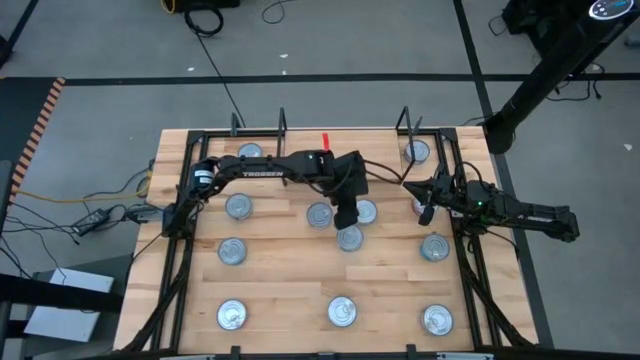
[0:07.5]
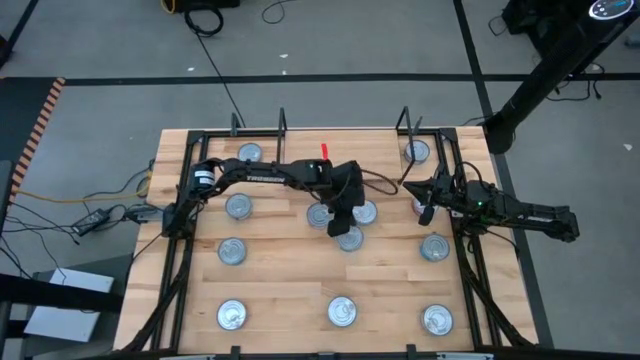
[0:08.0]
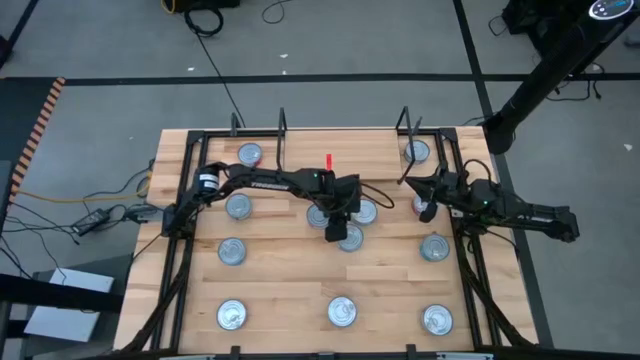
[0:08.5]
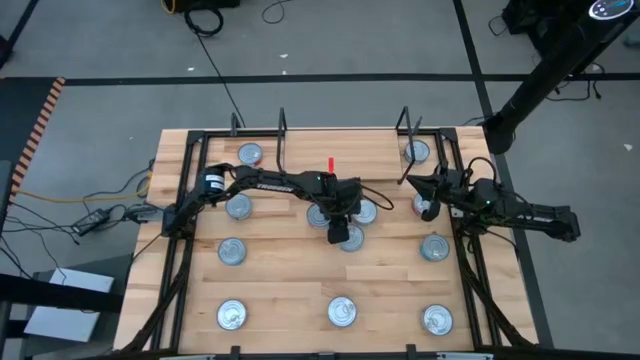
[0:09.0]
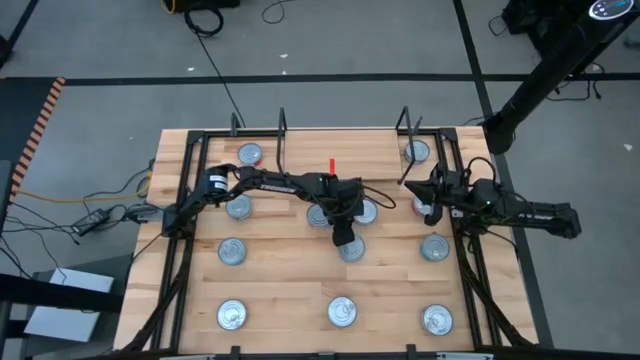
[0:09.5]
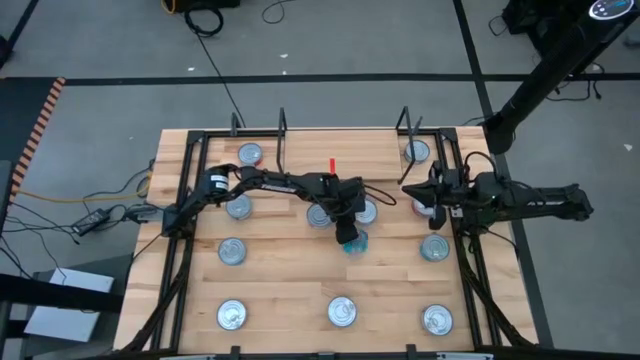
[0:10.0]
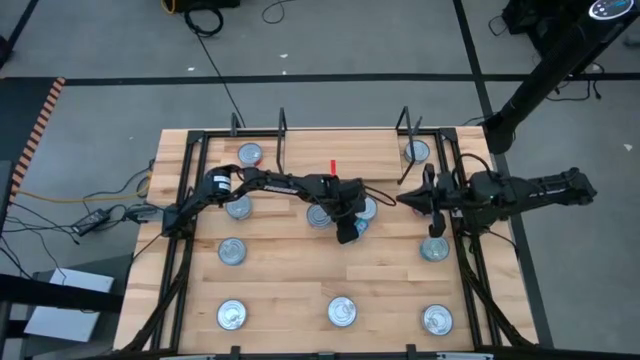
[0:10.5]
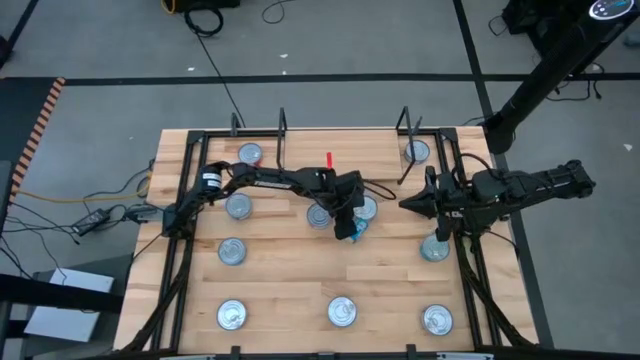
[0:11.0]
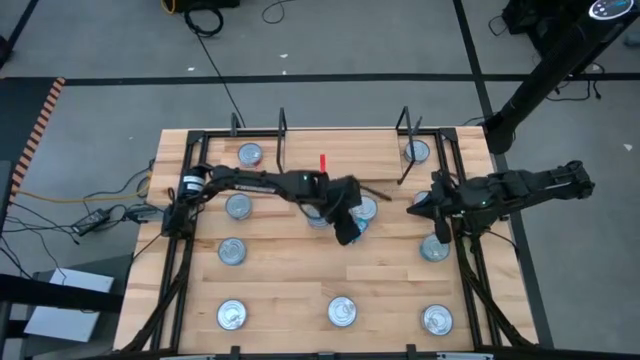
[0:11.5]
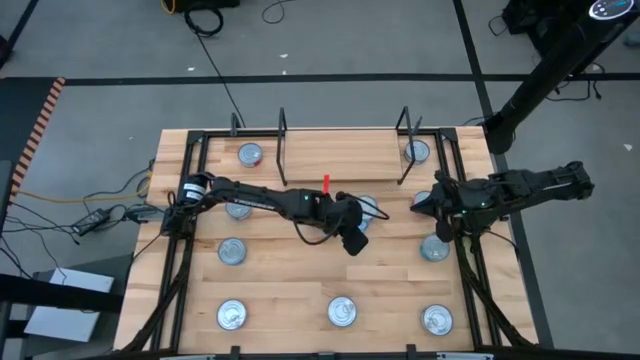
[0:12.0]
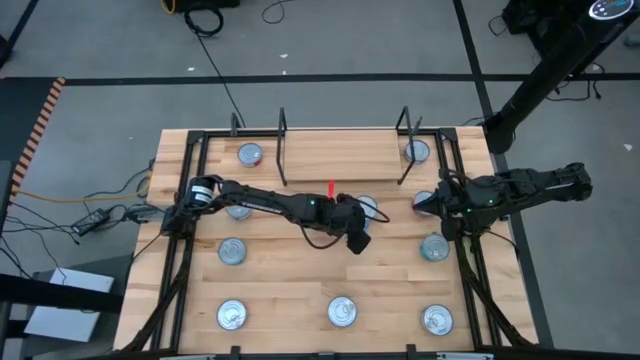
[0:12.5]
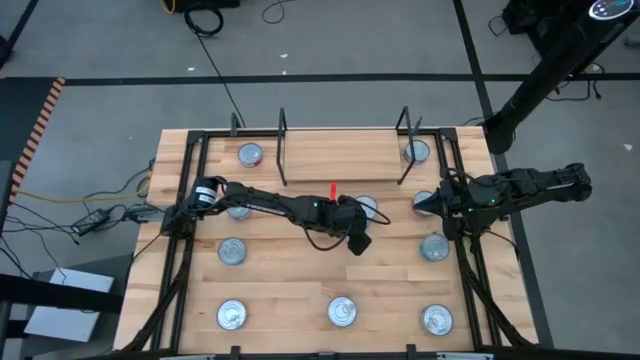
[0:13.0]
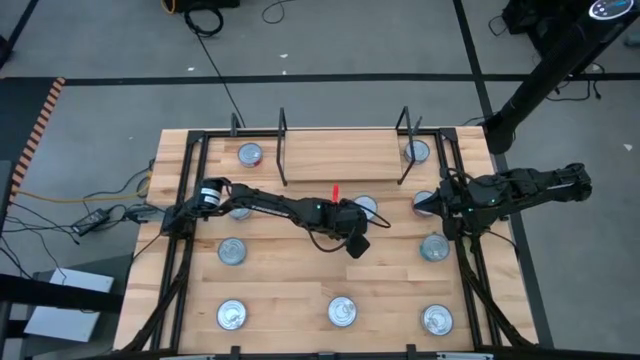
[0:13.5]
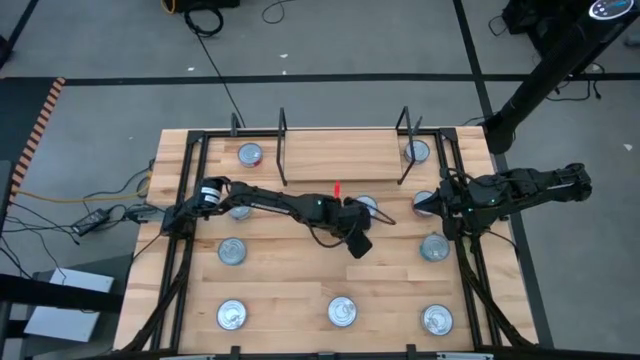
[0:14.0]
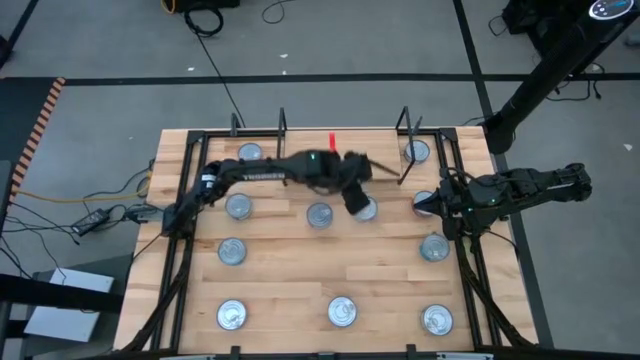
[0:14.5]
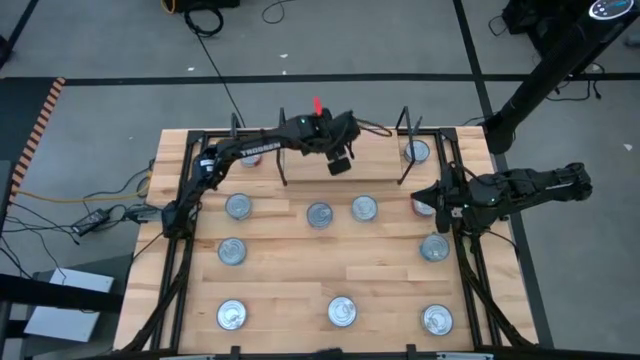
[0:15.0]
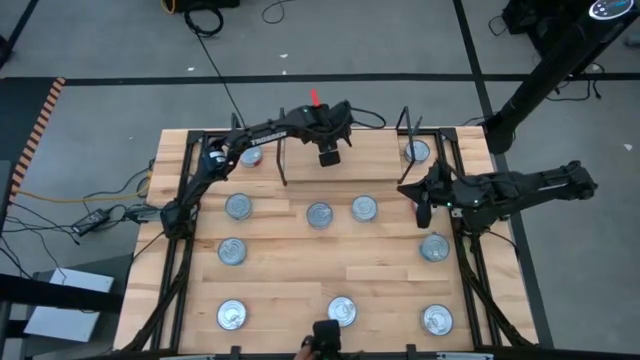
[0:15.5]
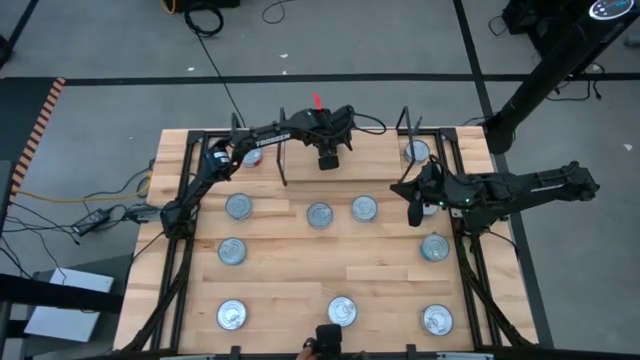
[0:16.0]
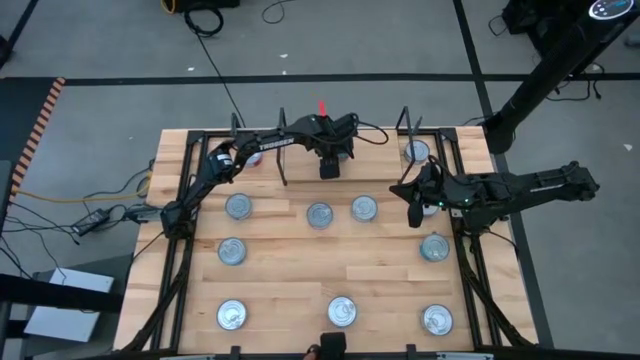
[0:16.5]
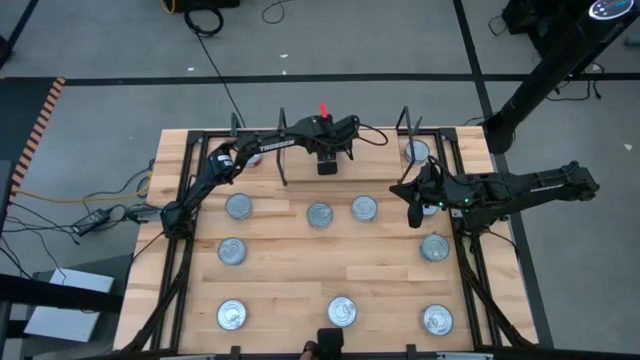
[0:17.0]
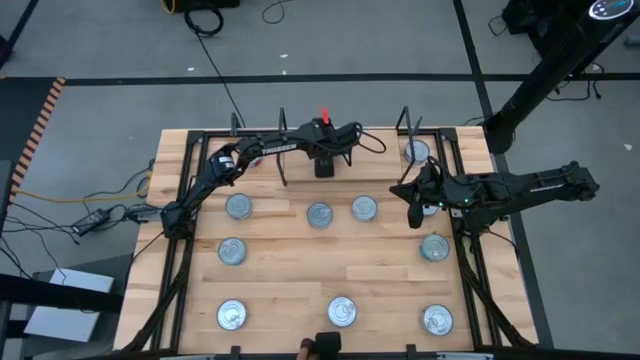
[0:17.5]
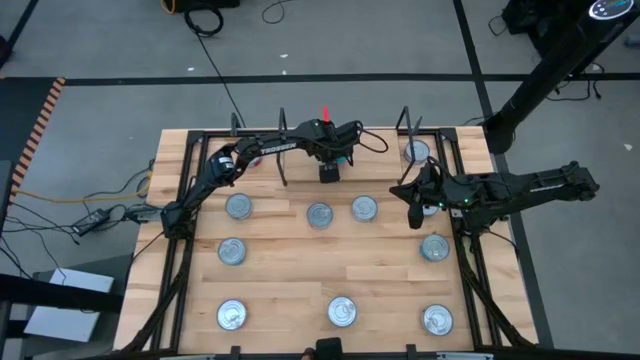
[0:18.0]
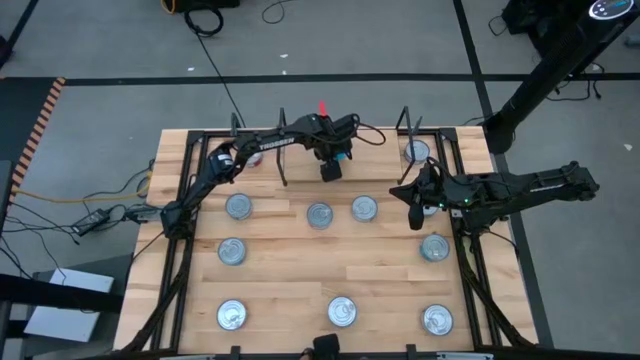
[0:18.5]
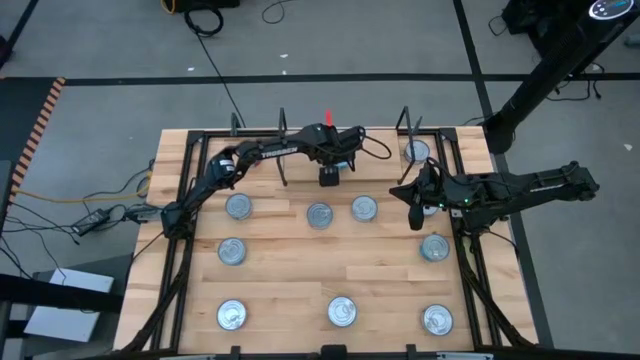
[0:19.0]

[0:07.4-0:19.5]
Task: Stack canned seafood by type on shelf
Put the light blue tuna can on the shelf

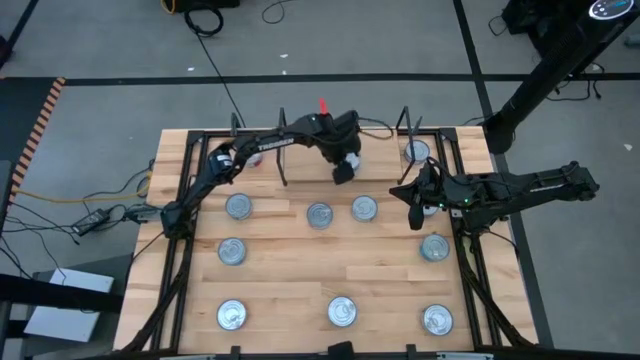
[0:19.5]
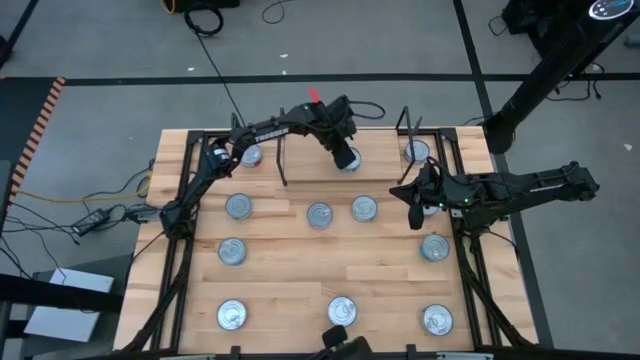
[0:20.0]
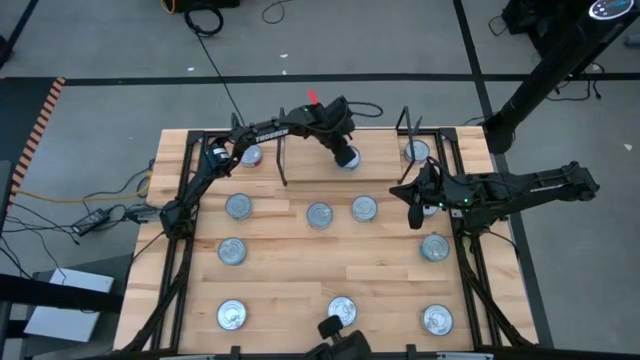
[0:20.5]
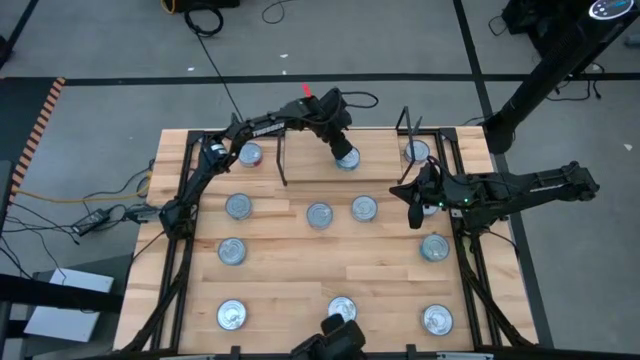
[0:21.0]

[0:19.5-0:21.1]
Put the light blue tuna can on the shelf

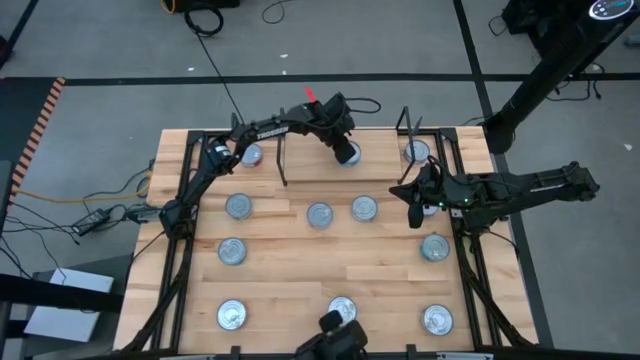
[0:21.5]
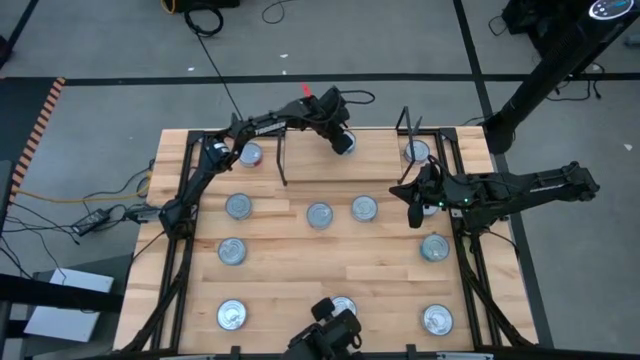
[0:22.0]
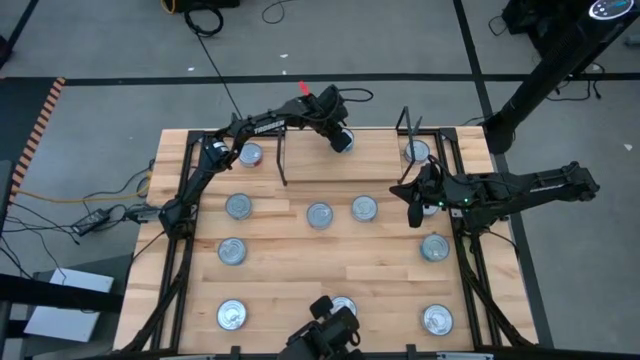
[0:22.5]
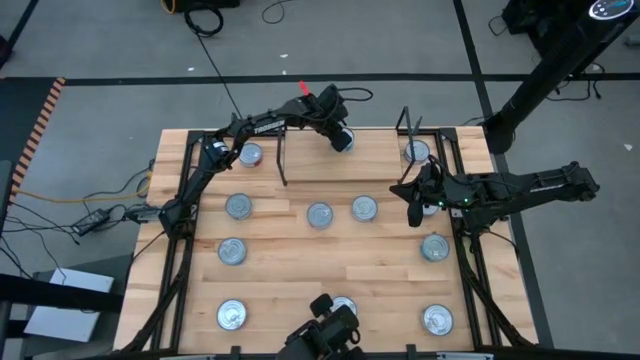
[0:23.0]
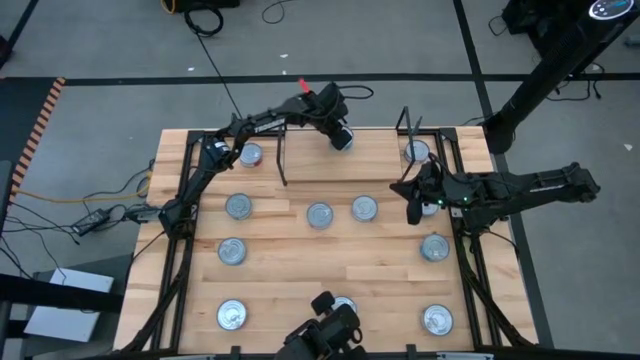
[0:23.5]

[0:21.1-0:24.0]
Put the light blue tuna can on the shelf

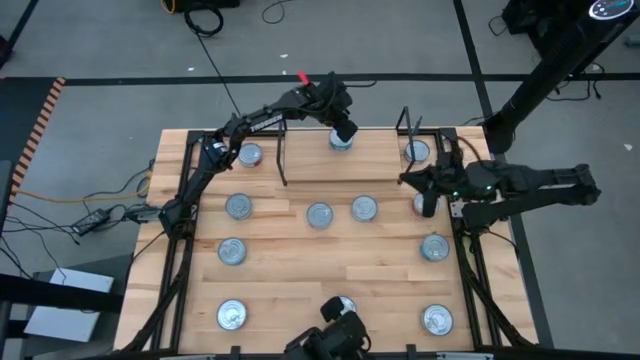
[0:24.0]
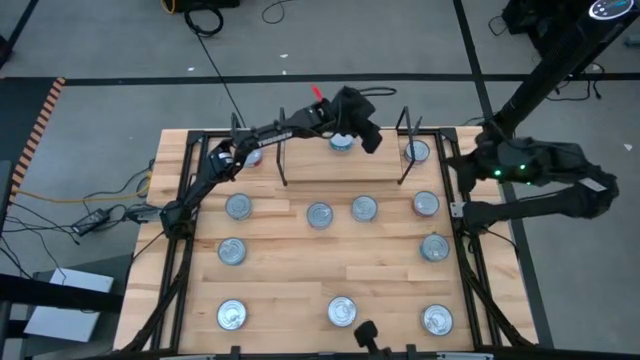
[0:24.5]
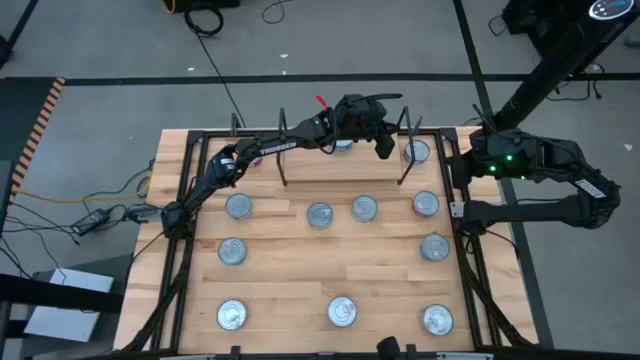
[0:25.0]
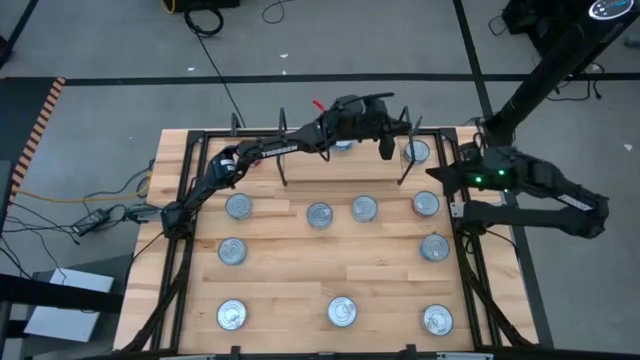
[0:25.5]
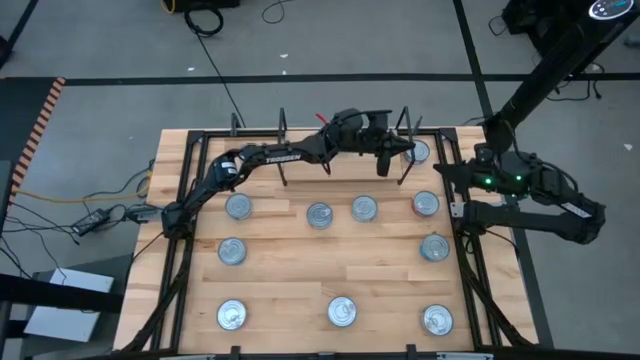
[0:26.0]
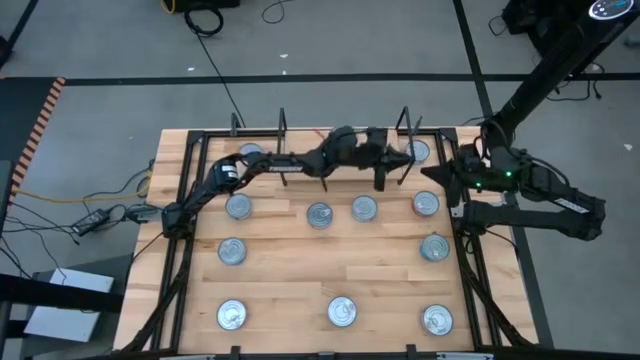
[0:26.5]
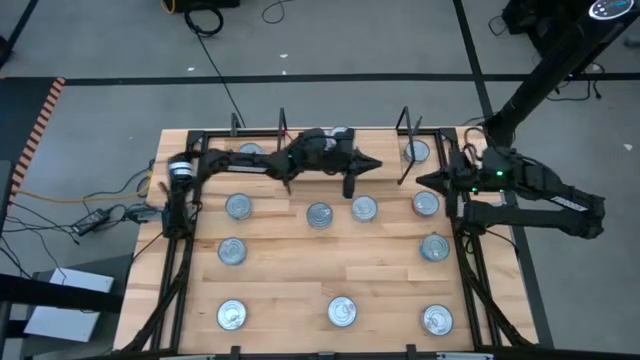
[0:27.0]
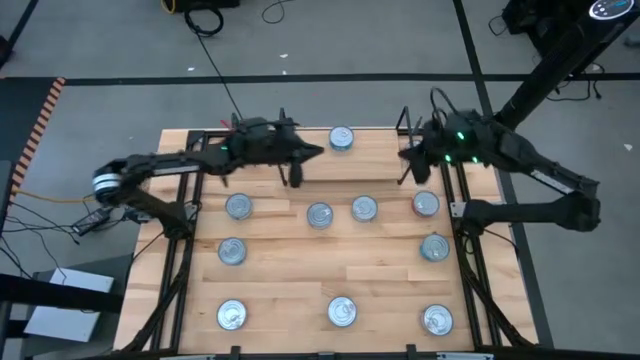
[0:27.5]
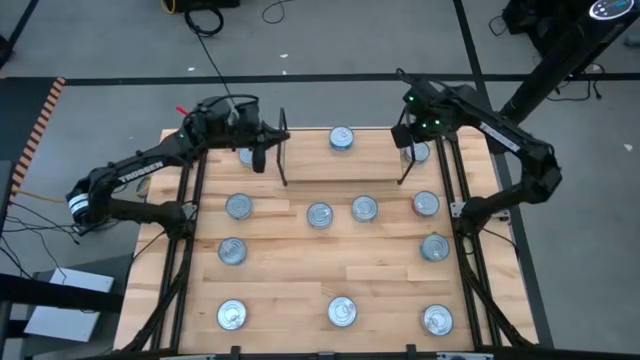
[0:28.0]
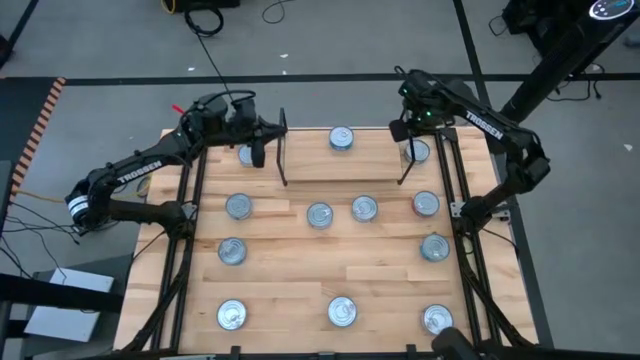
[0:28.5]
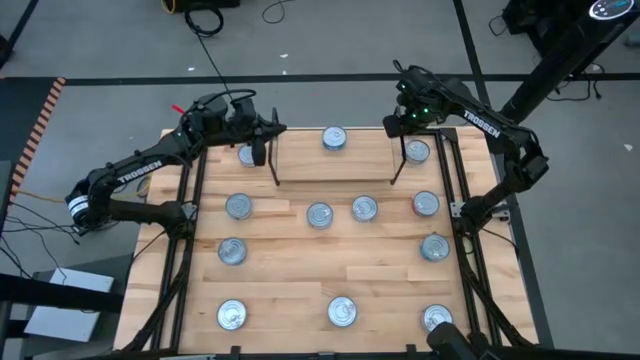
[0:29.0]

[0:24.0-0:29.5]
Adjust the shelf
